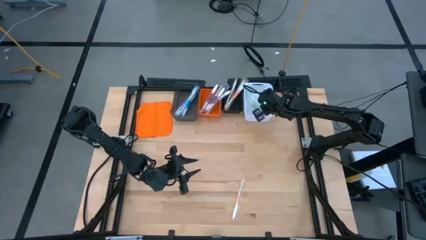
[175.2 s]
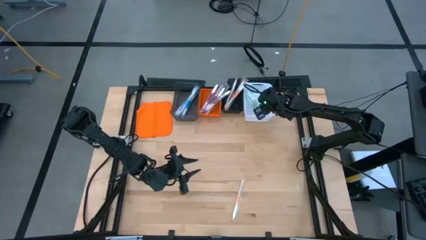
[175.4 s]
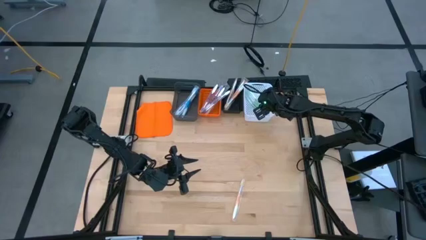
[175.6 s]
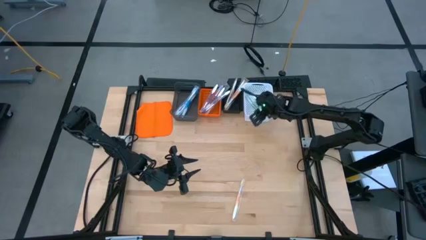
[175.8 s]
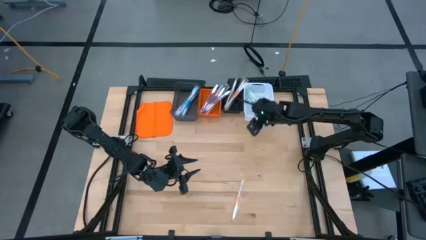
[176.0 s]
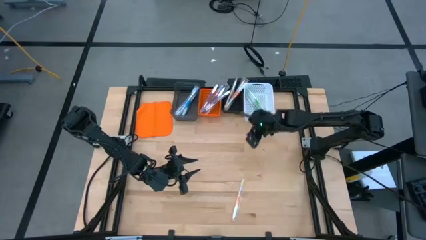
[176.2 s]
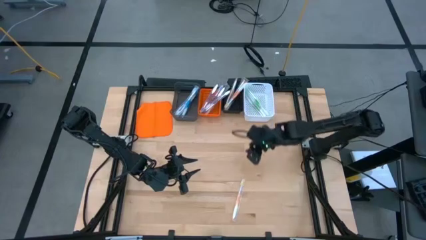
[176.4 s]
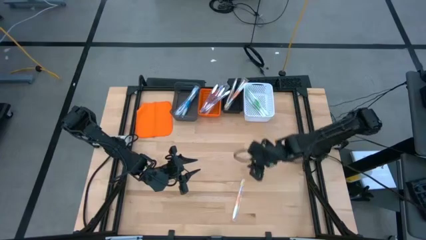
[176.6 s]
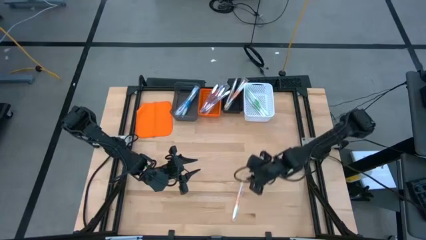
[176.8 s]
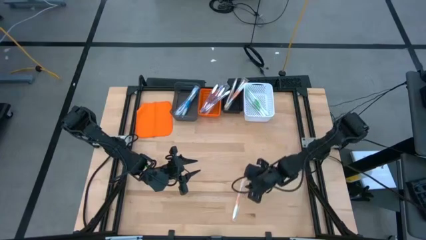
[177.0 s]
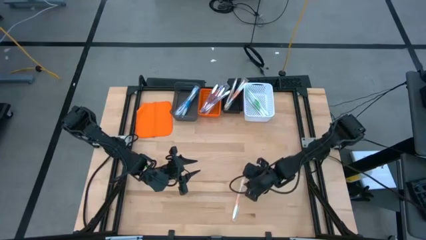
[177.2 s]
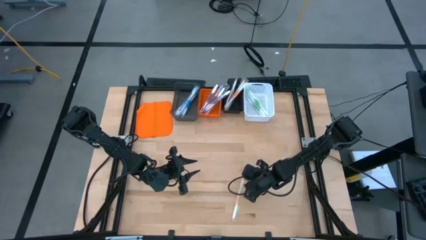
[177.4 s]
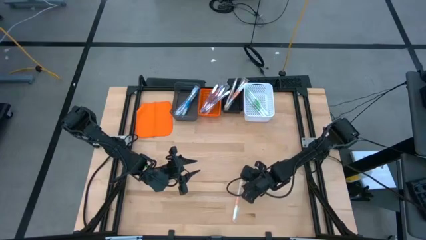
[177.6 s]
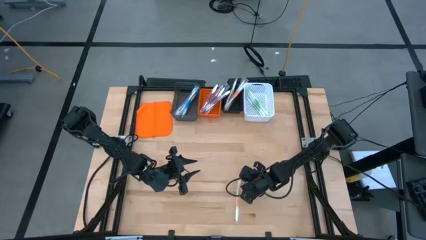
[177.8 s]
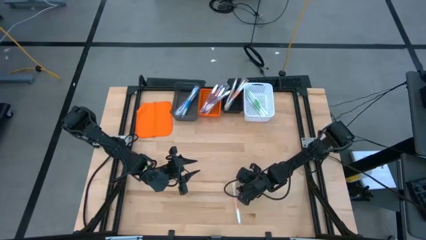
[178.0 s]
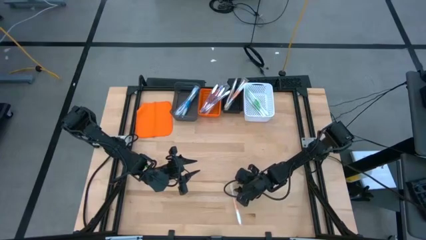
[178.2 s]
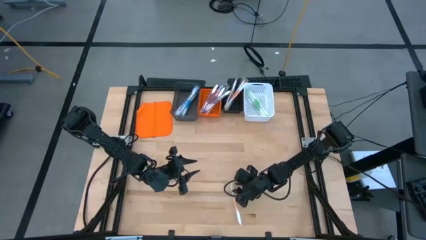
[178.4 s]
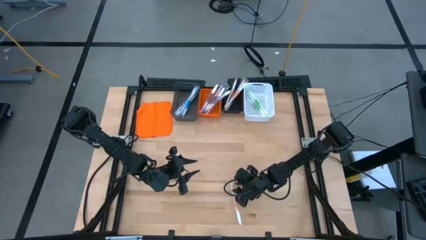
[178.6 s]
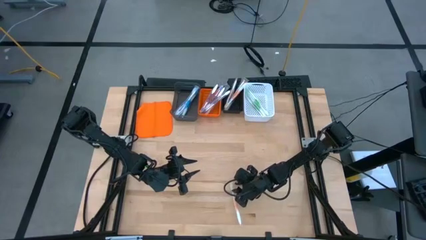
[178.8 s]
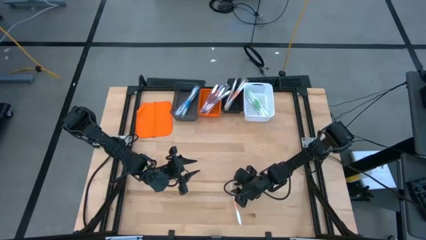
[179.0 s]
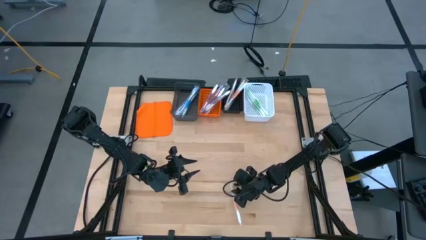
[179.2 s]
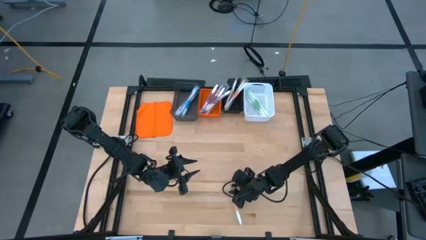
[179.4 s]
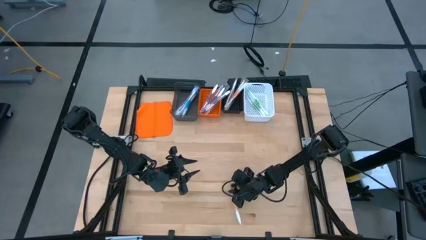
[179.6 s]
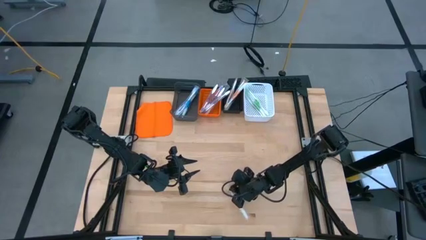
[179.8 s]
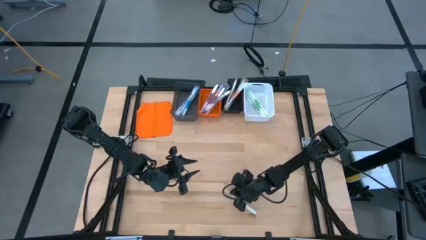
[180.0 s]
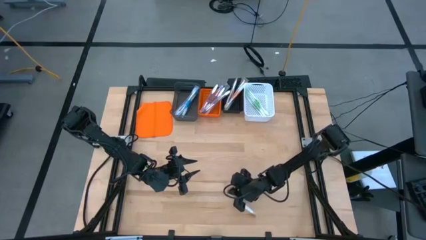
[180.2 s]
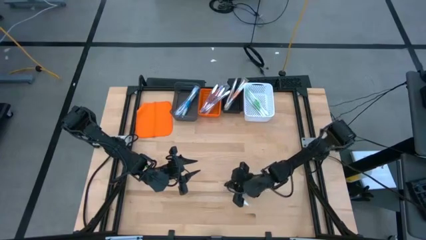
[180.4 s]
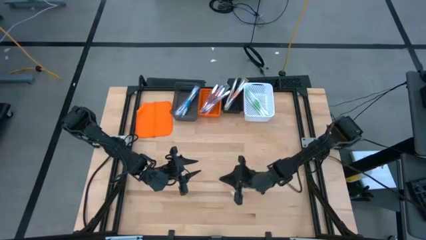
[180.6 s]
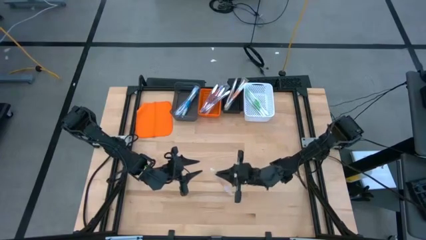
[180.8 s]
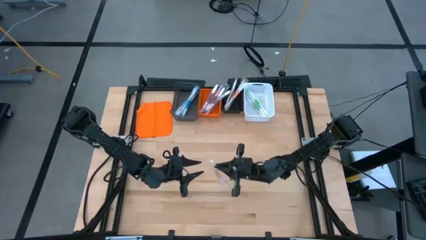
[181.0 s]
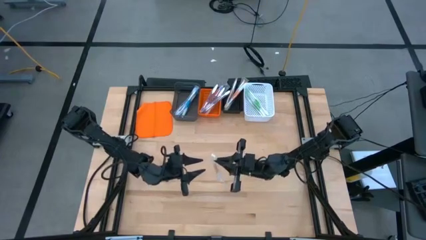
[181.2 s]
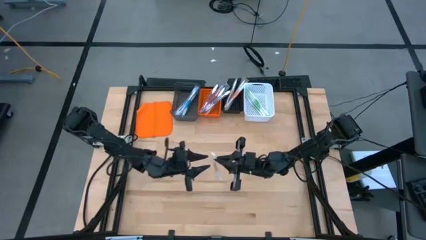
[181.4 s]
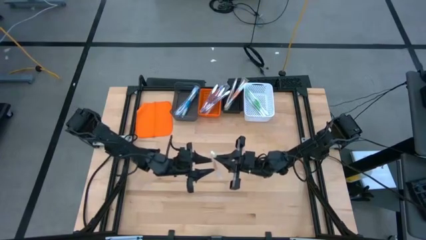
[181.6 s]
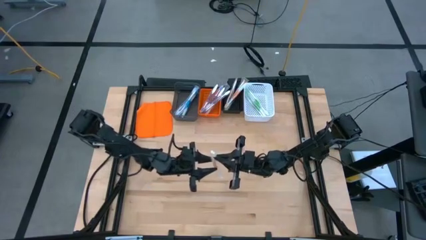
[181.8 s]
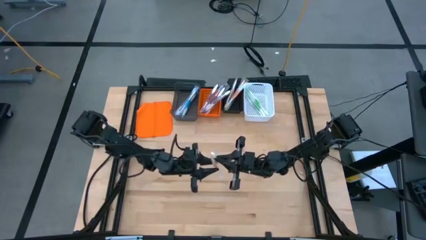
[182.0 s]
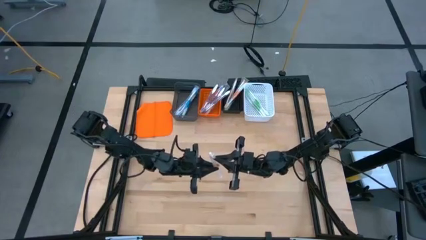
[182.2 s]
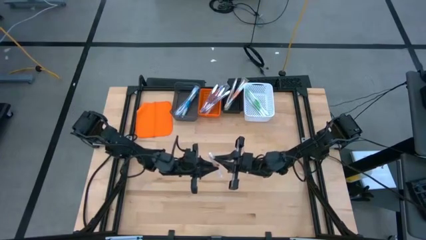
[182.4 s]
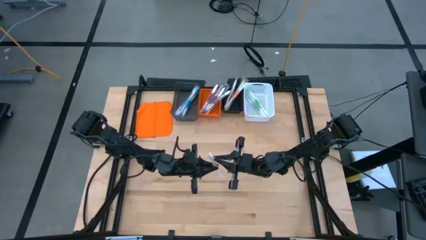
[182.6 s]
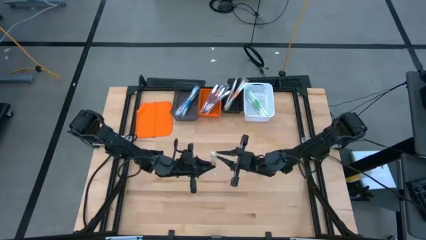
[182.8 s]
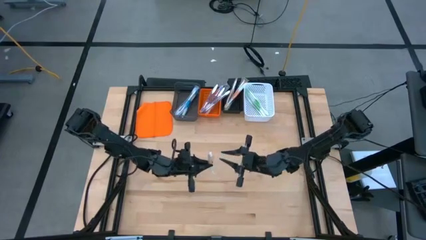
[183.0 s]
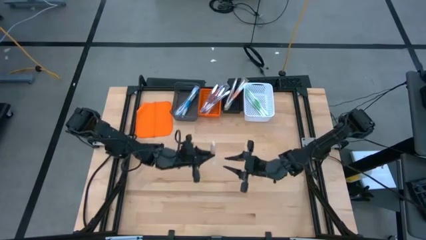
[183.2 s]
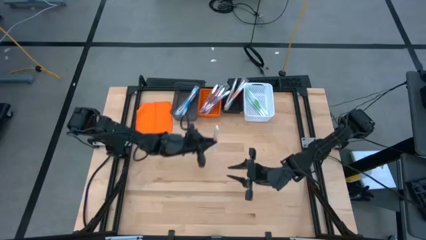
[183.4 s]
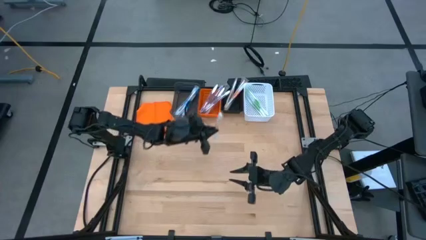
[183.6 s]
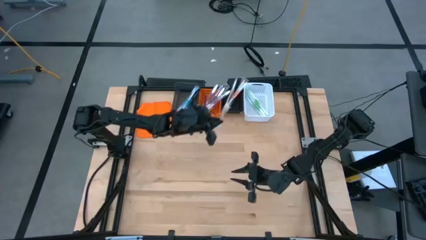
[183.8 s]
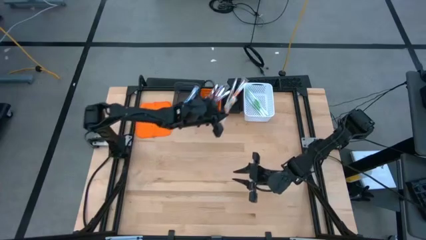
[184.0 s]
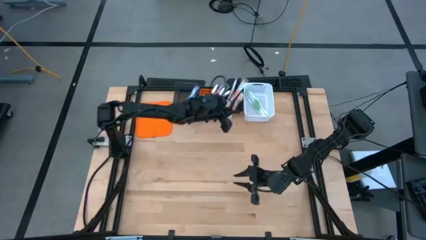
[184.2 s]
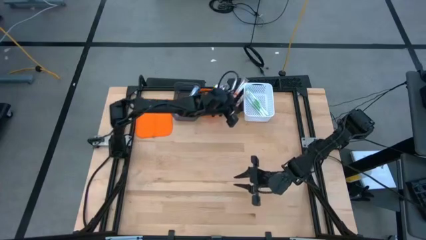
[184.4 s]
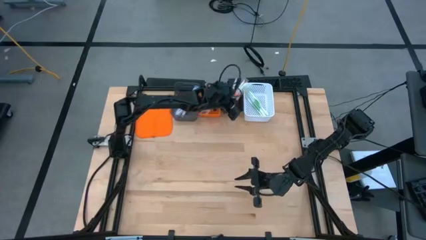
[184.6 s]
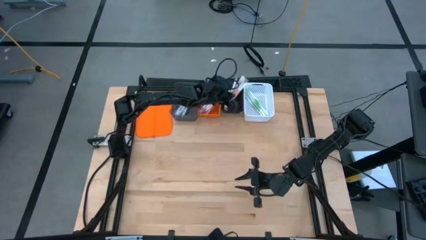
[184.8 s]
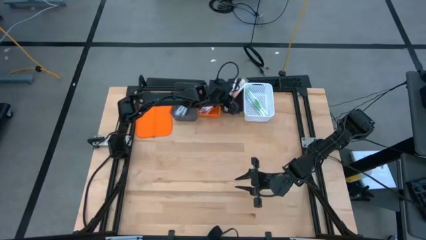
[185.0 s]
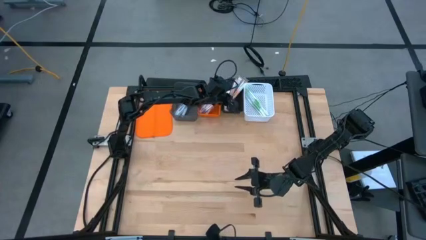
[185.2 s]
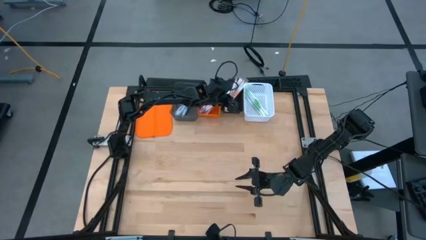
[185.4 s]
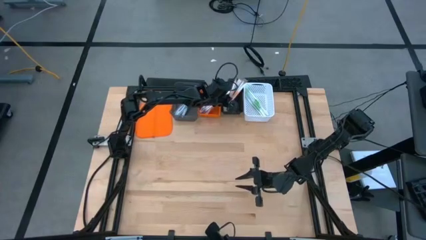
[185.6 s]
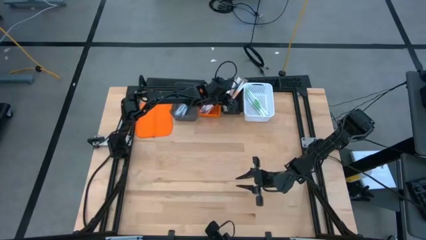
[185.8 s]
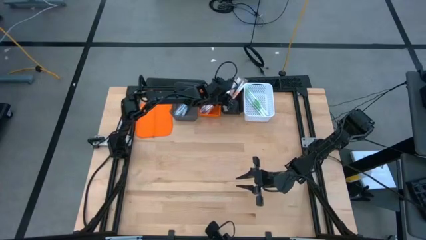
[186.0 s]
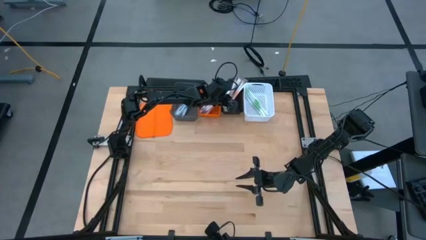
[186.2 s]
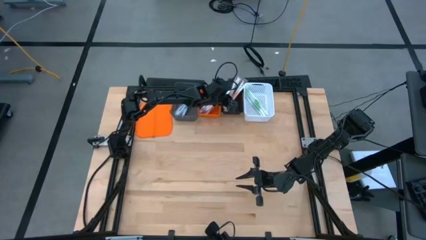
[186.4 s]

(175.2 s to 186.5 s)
Task: Pick & Place Toothbrushes
Put the orange toothbrush into the black bin

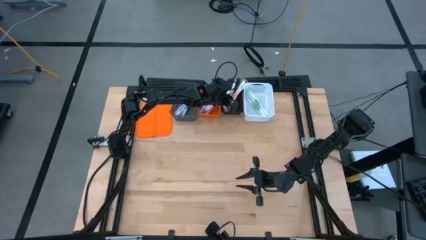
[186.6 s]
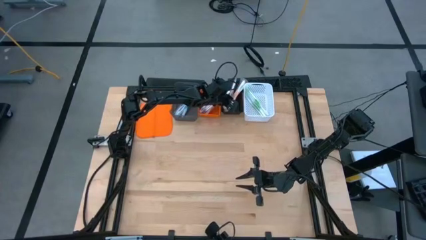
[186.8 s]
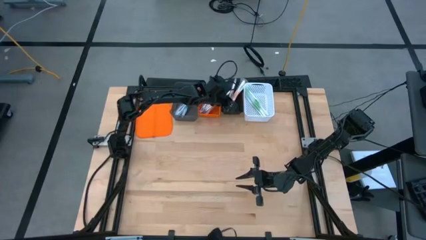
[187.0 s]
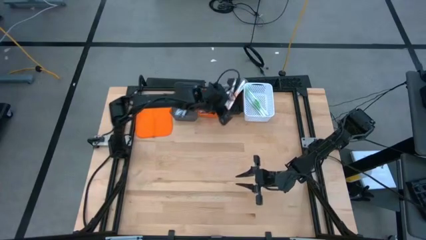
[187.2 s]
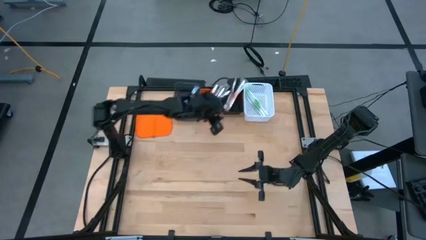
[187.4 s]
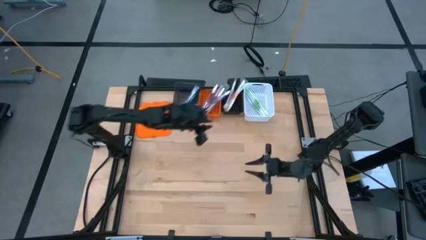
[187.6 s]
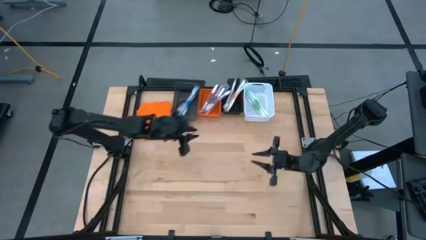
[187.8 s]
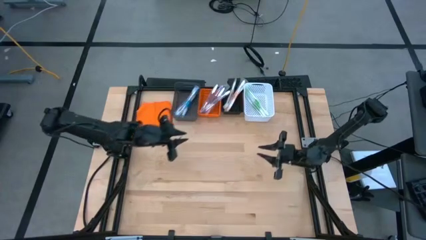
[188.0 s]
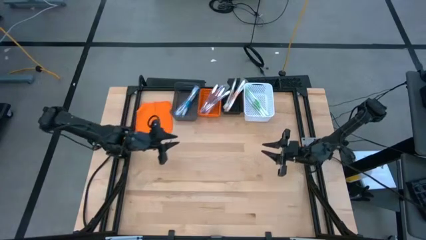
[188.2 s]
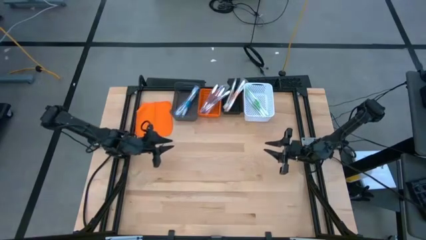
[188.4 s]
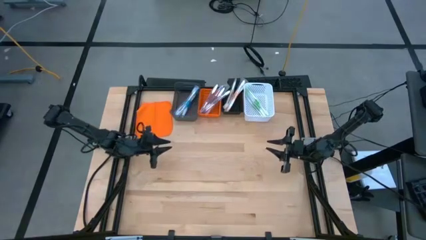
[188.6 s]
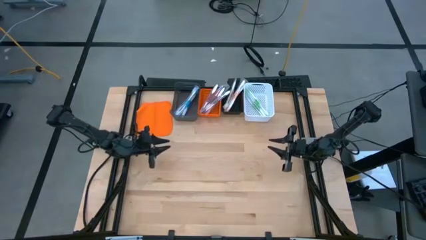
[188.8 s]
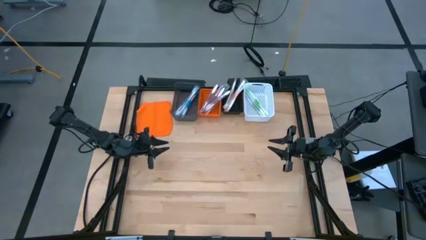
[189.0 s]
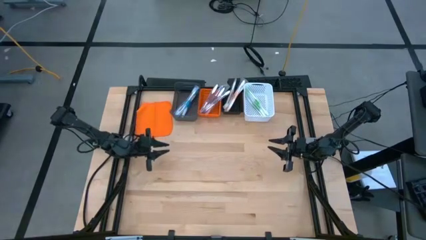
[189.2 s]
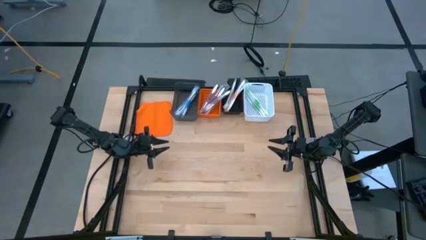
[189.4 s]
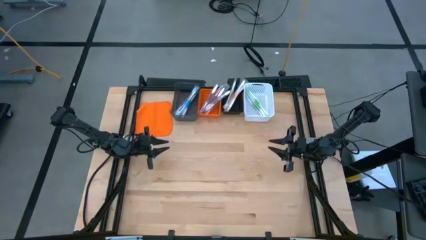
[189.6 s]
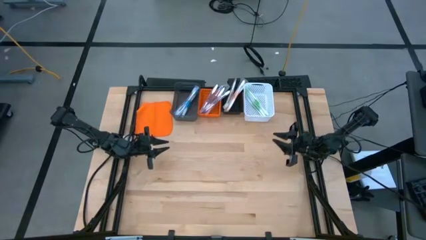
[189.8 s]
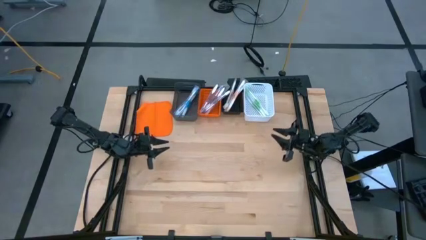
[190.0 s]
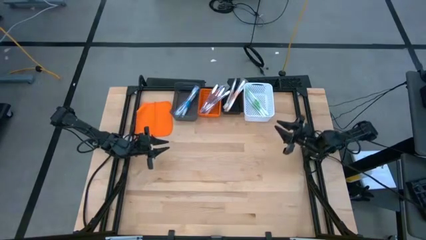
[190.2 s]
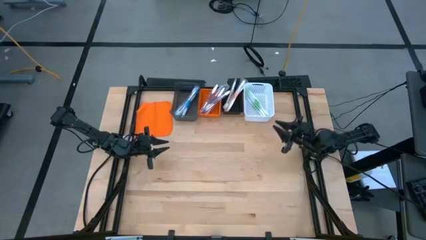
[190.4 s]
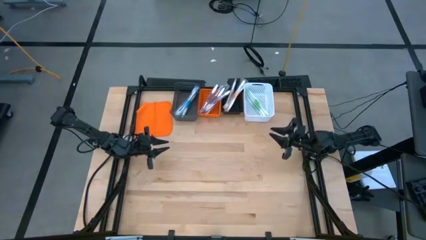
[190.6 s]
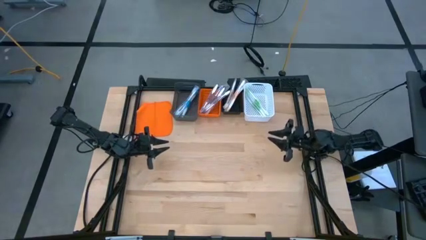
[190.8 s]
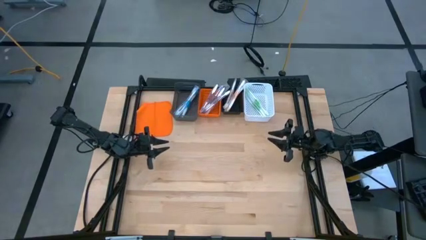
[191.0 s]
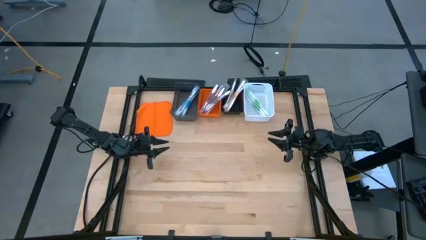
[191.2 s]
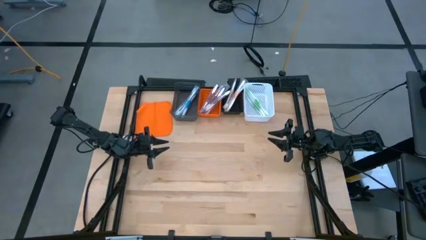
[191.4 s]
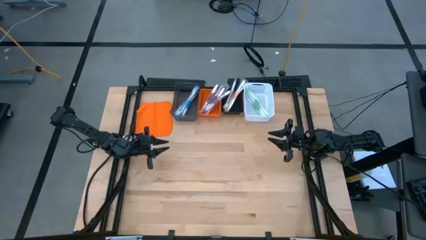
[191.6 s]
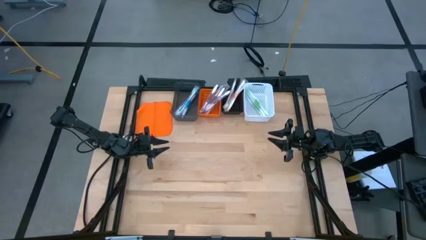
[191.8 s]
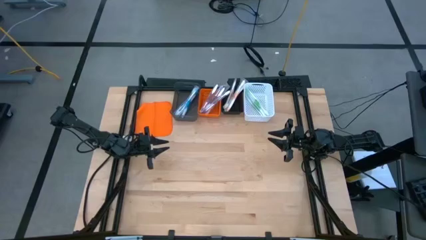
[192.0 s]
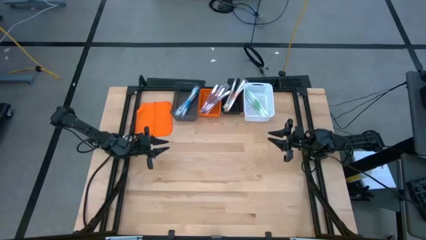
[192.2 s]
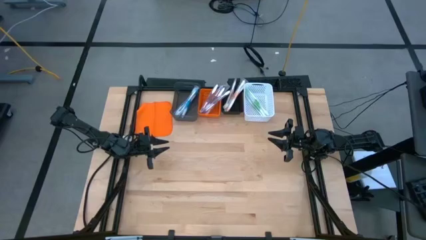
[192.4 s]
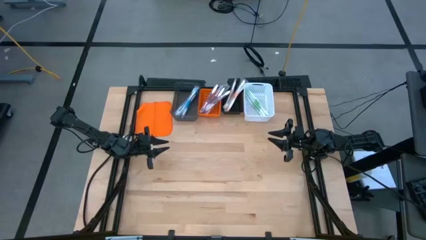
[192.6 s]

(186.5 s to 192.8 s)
Return to Home Position
